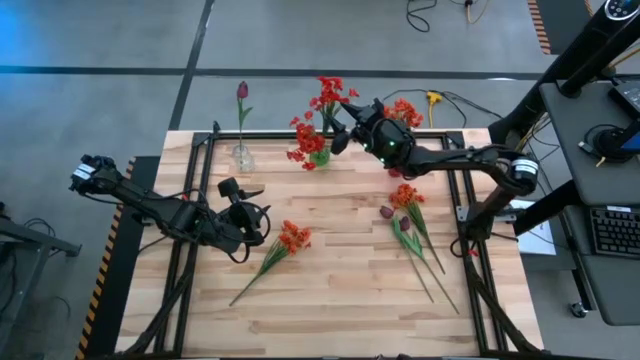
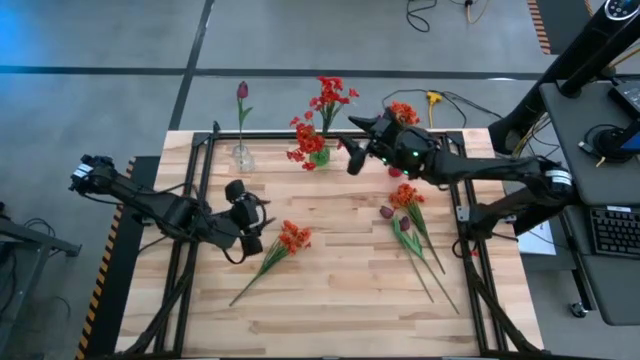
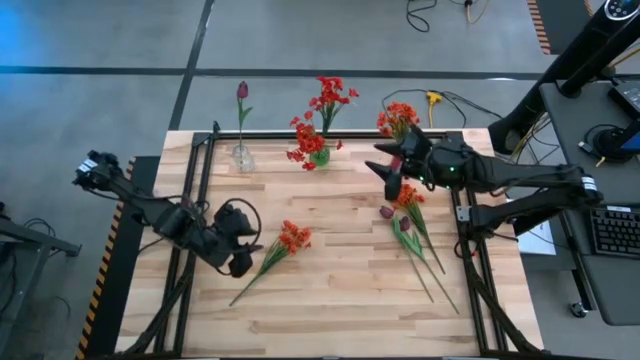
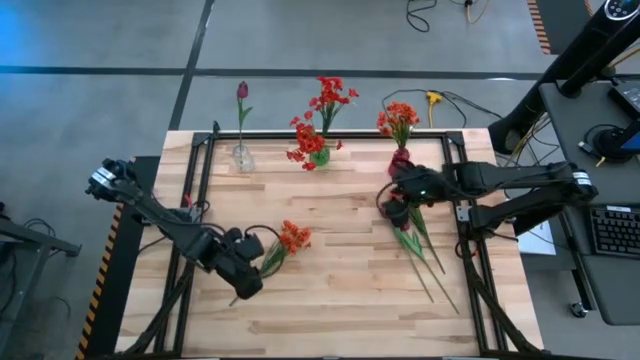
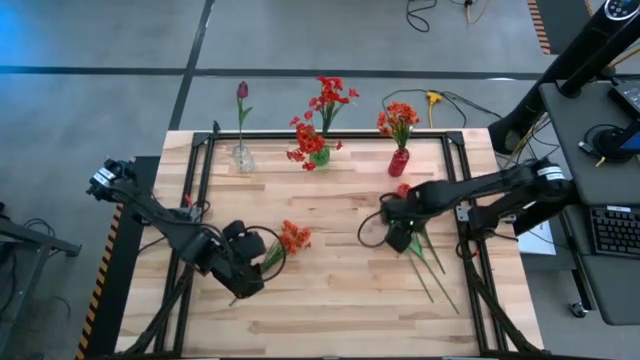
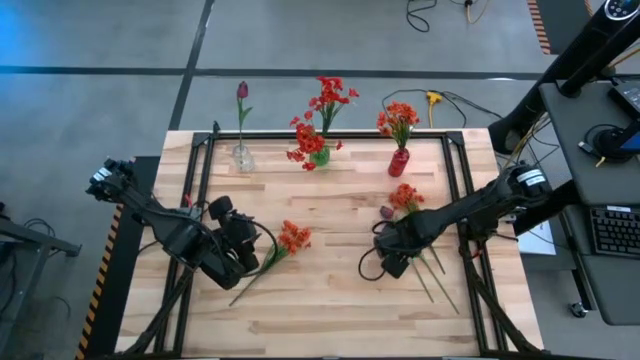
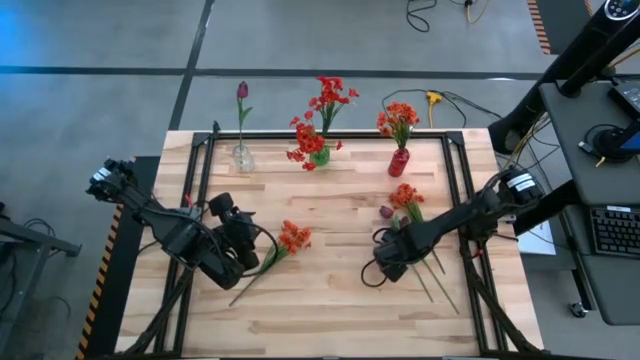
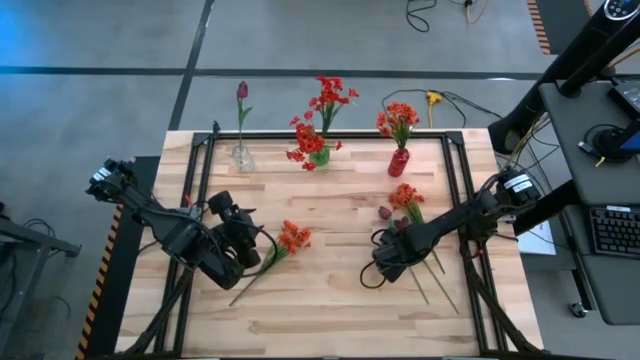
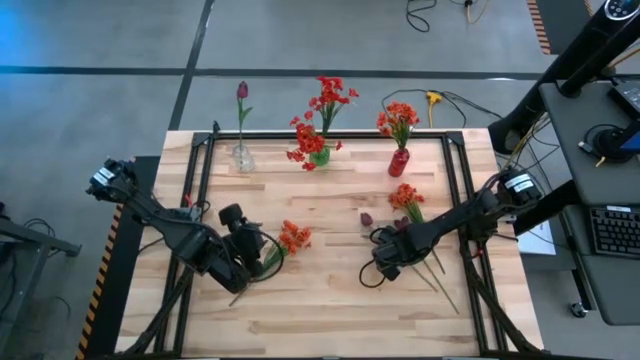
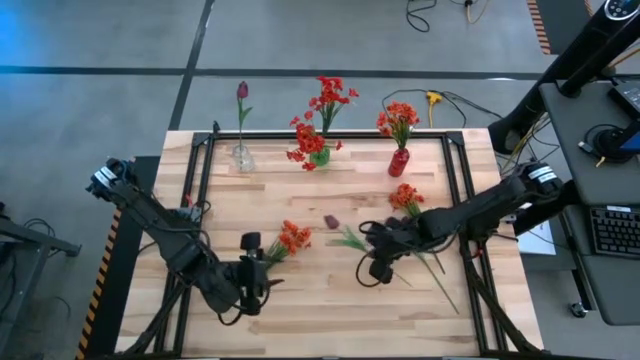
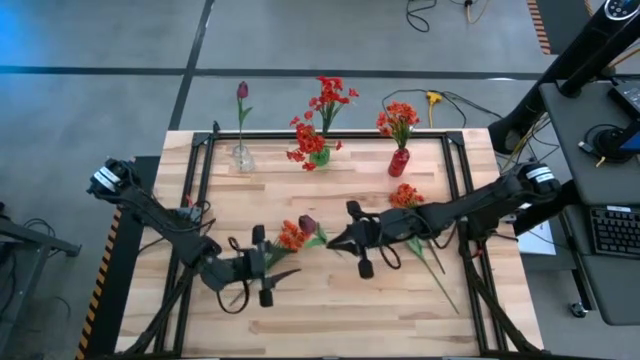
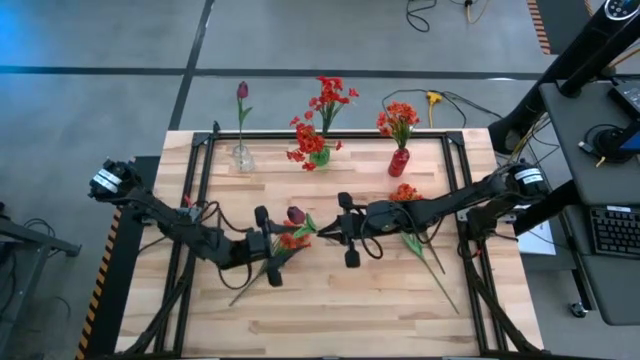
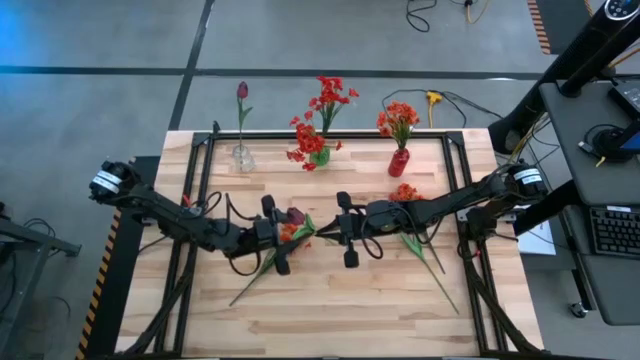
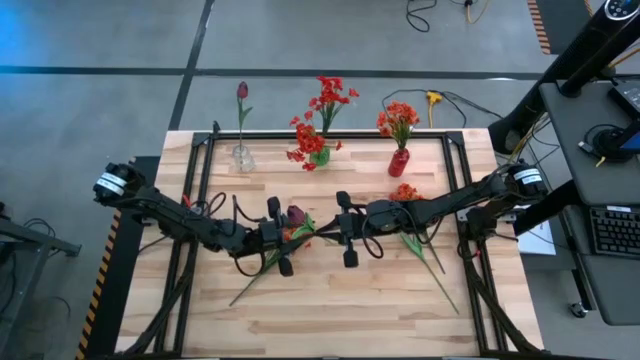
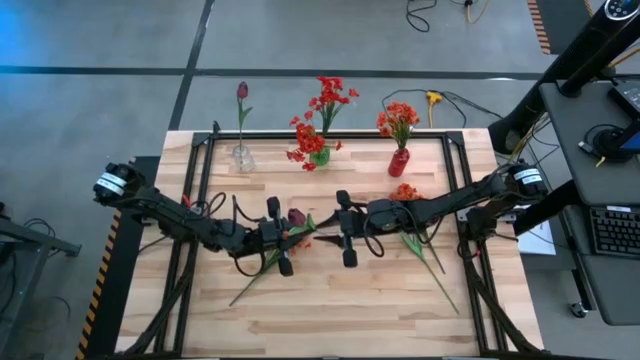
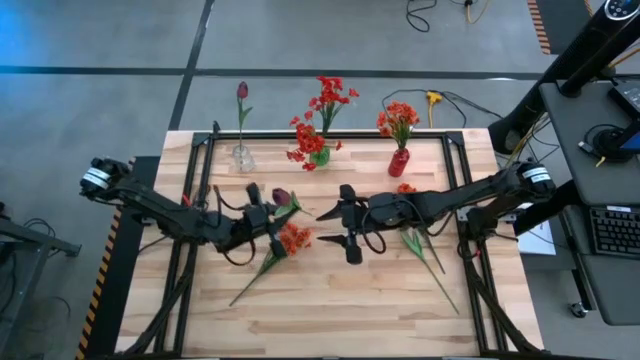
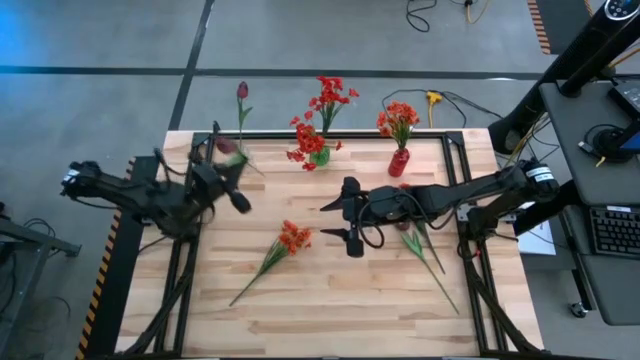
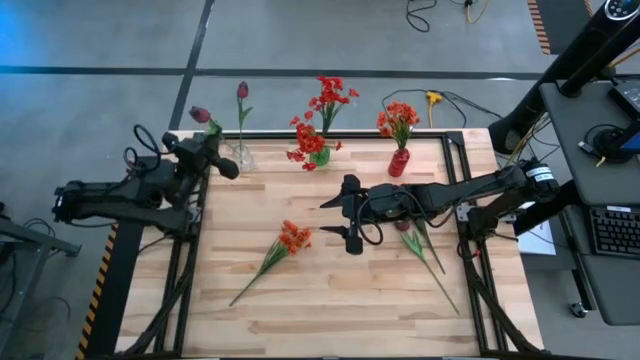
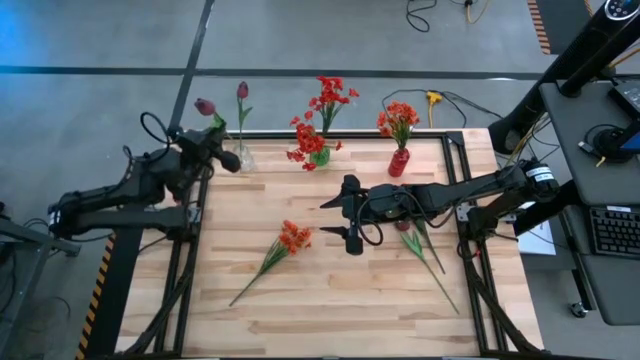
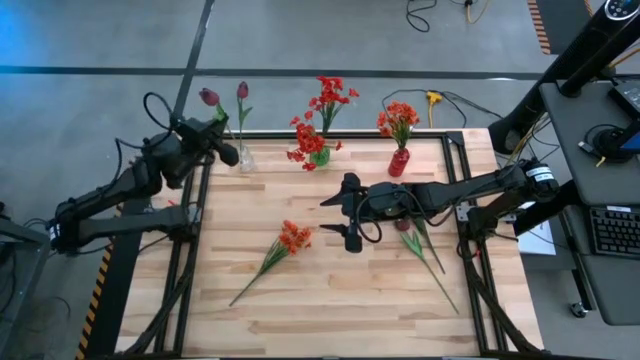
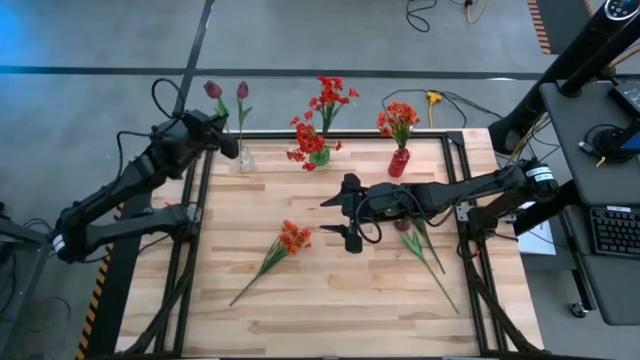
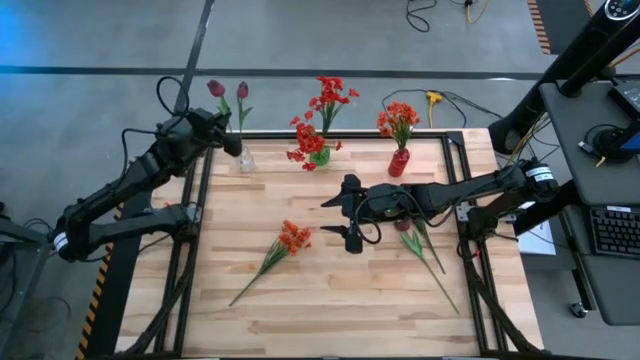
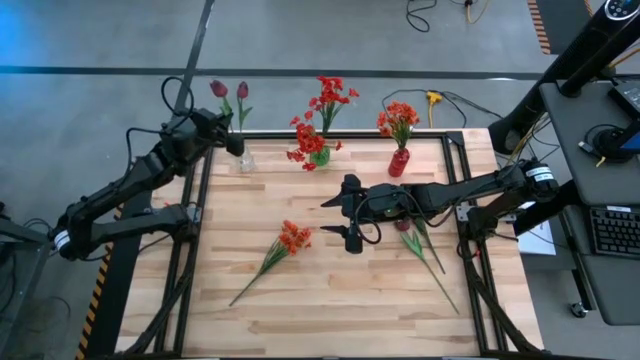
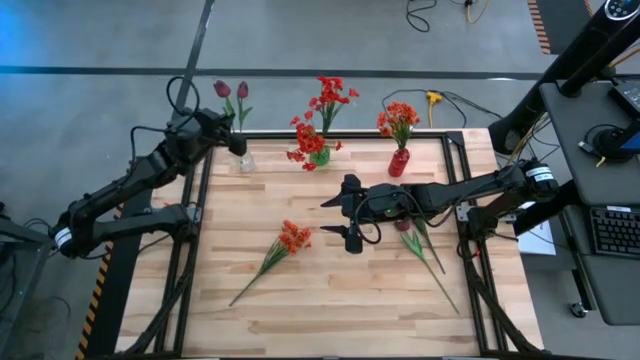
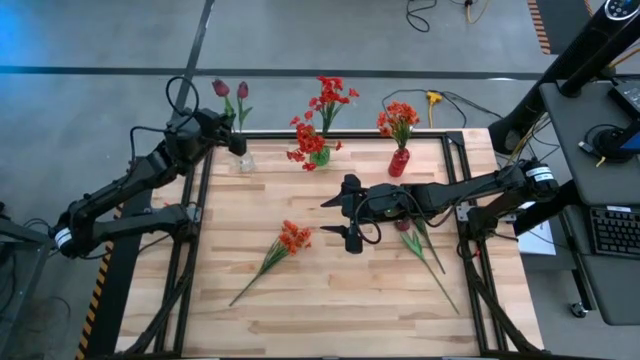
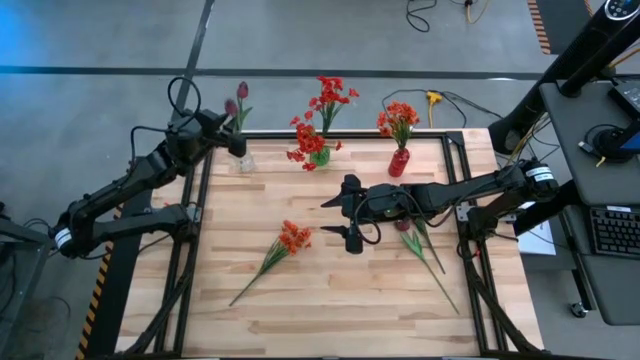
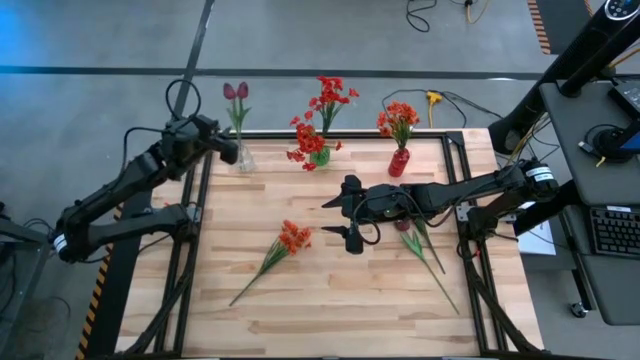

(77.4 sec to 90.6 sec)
Task: Sort flowers into vase by color
Put the left purple tulip into the transparent vase

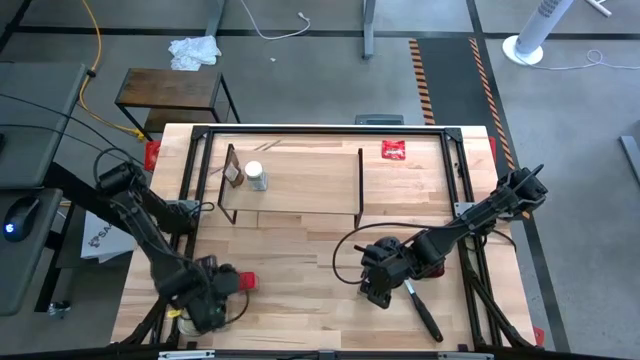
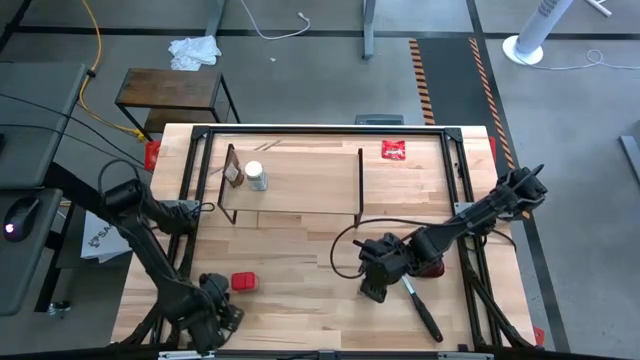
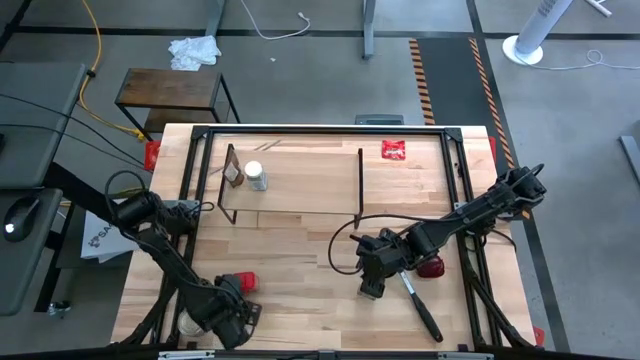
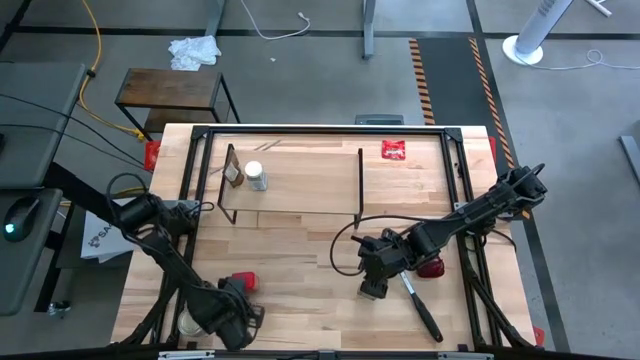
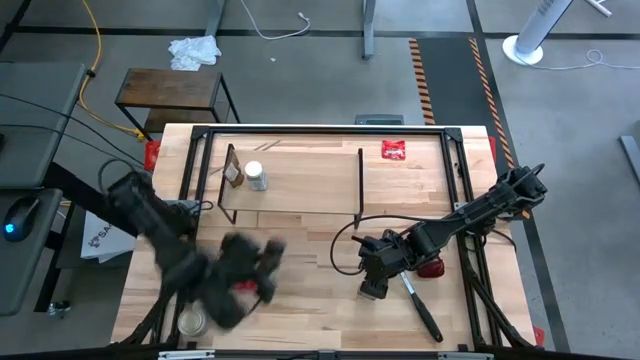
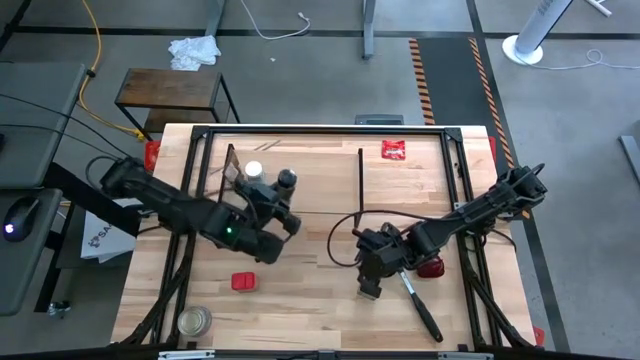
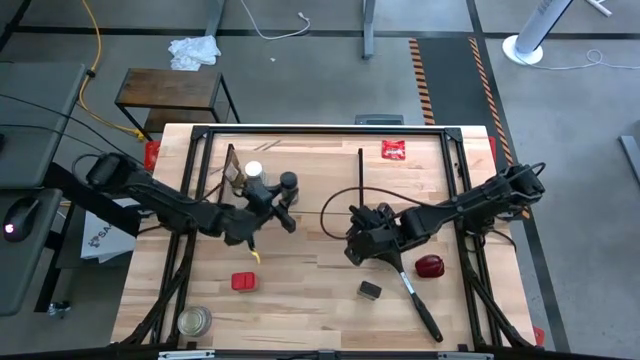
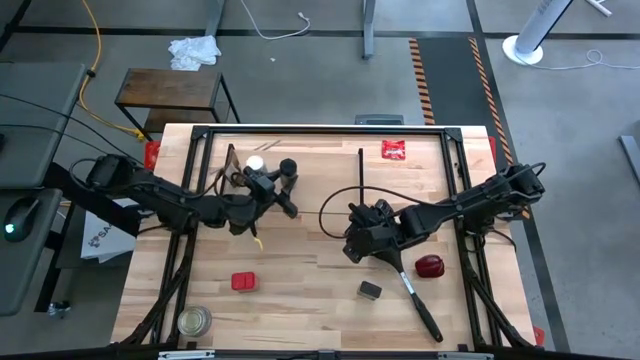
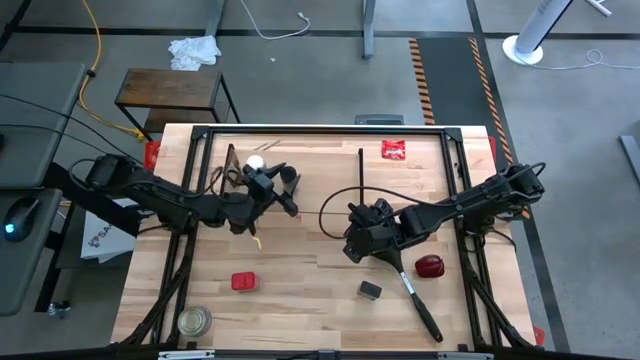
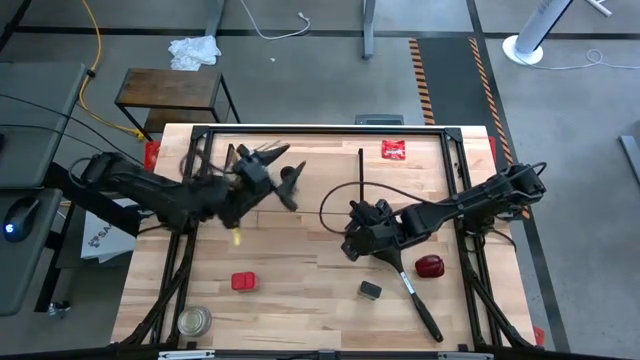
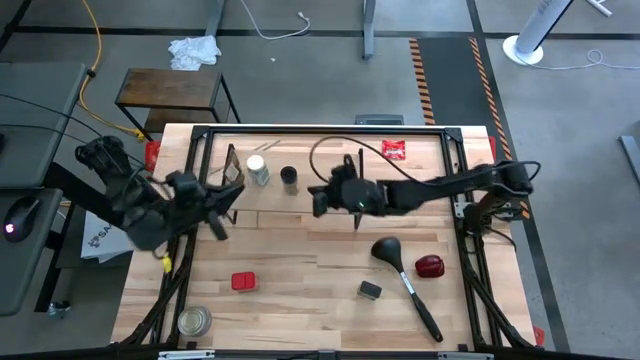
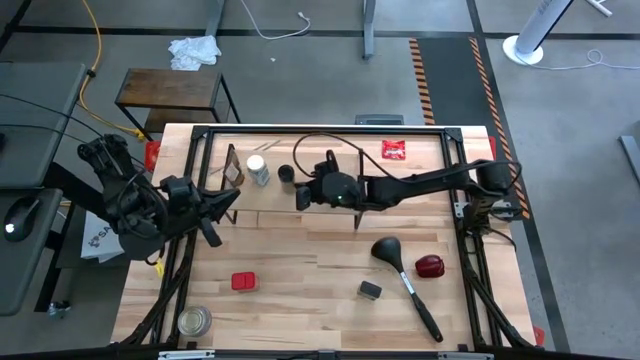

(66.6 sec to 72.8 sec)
Task: Shelf spices
Put the black seasoning bottle on the shelf
